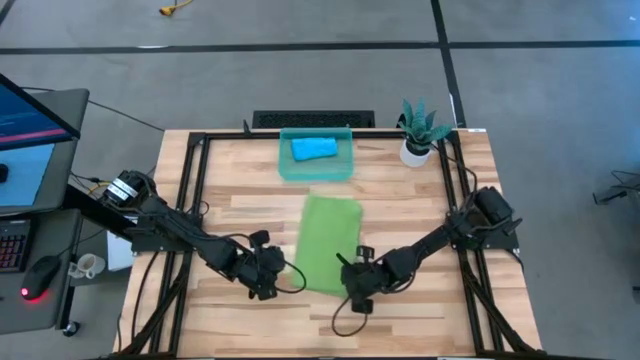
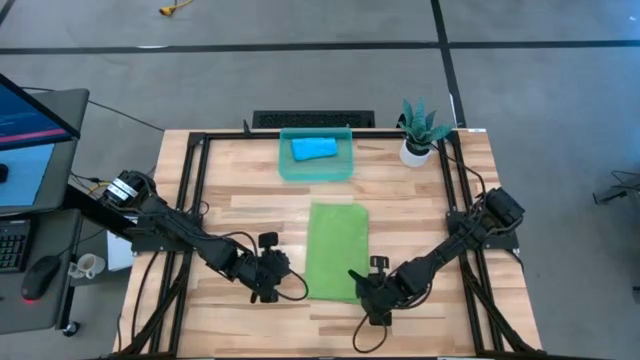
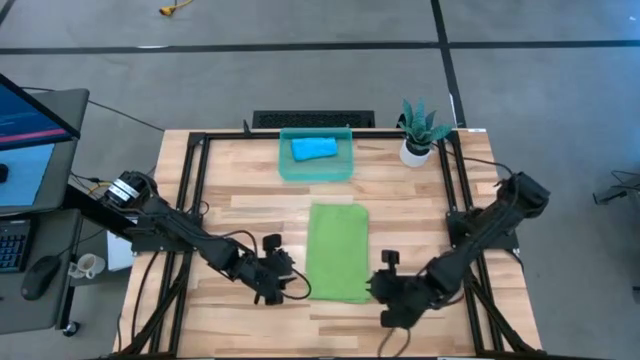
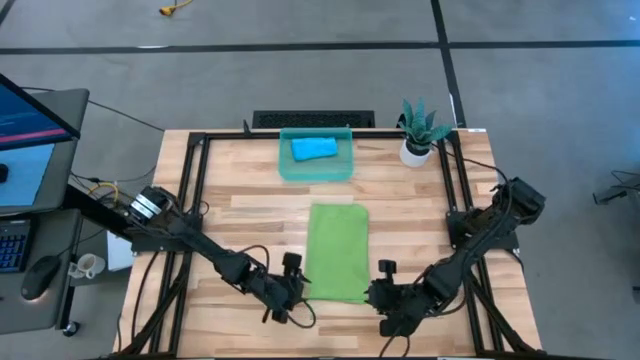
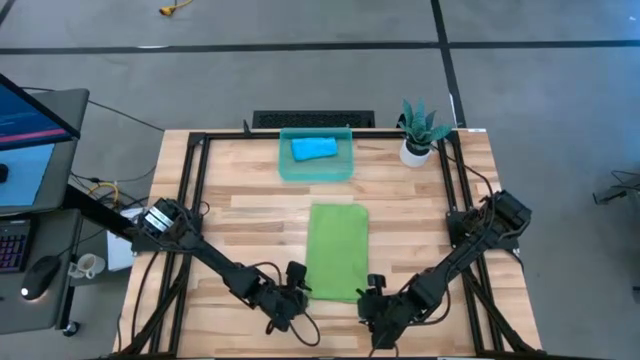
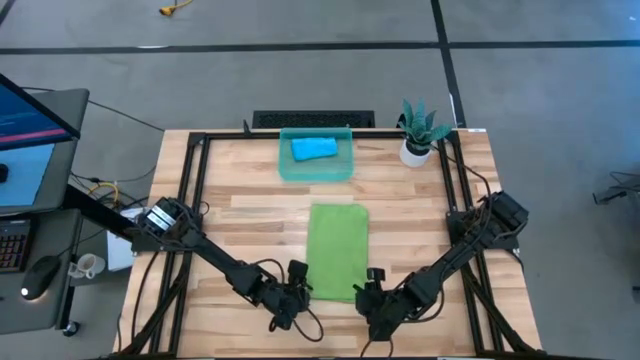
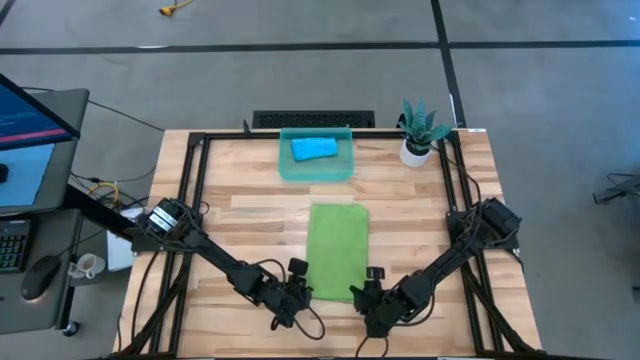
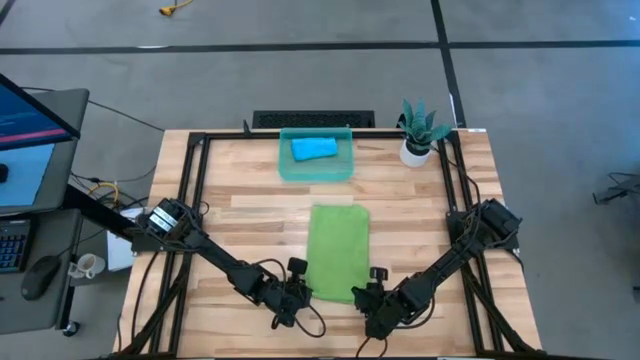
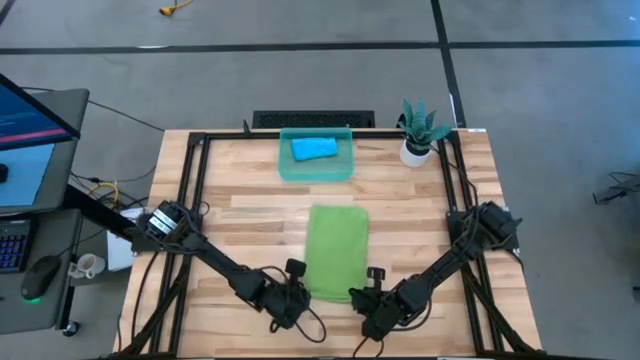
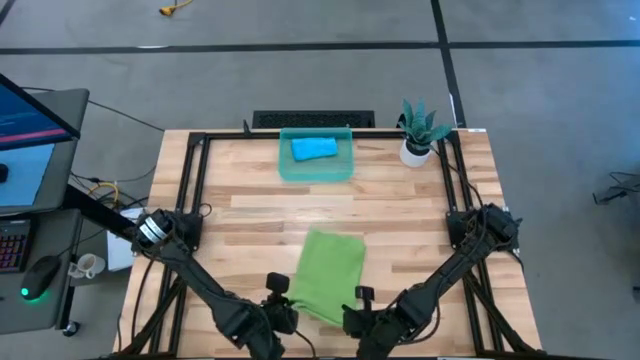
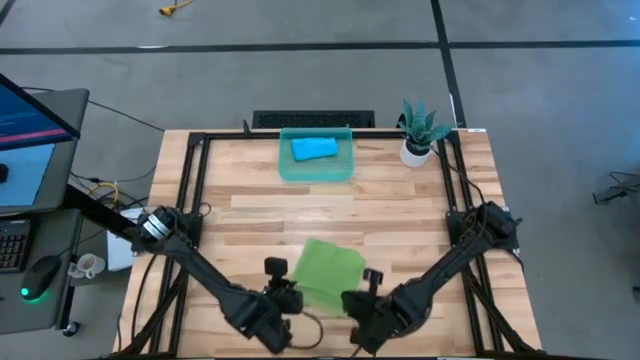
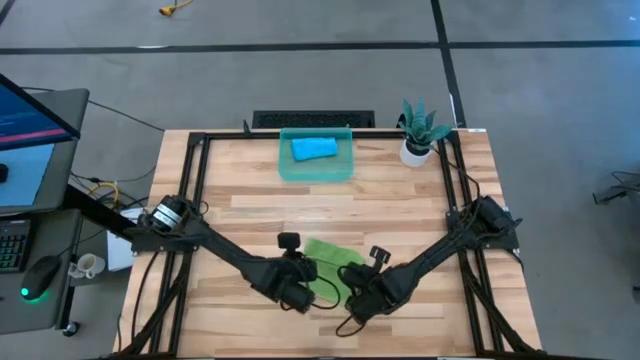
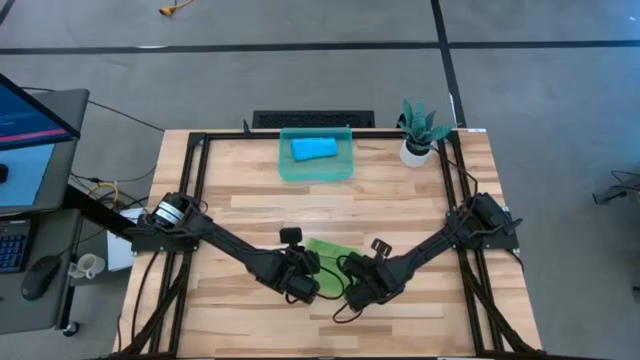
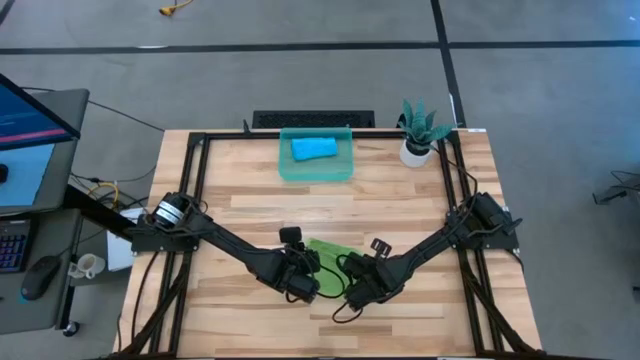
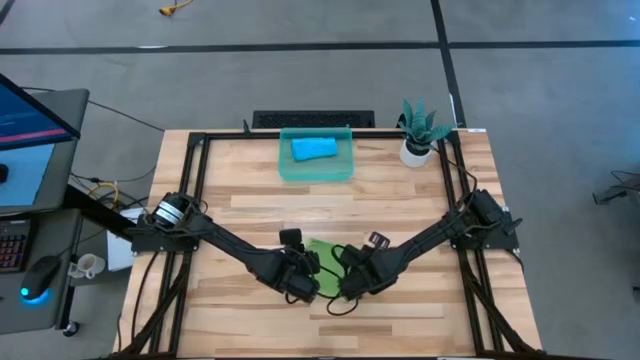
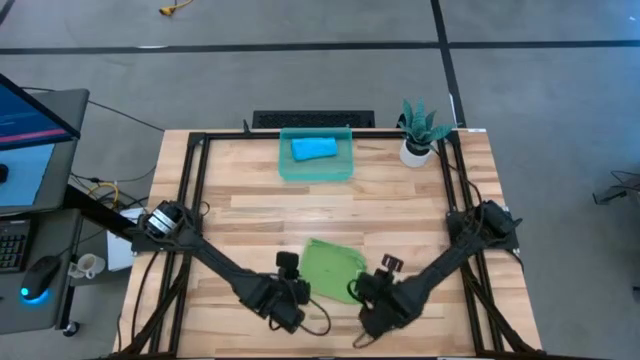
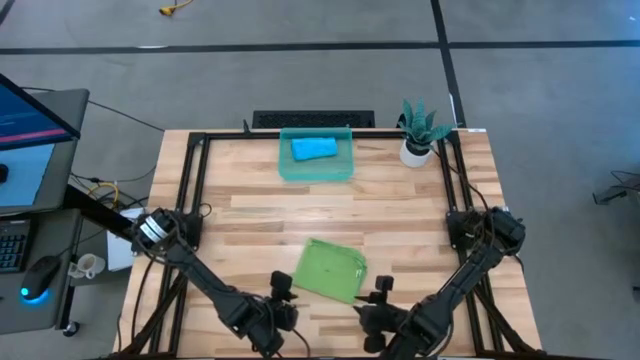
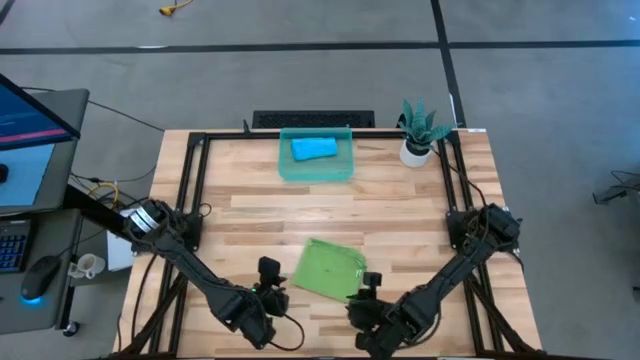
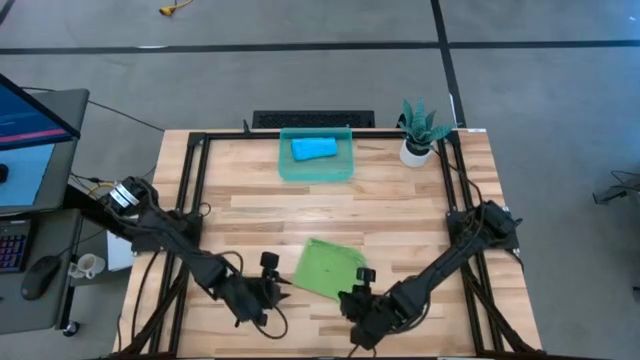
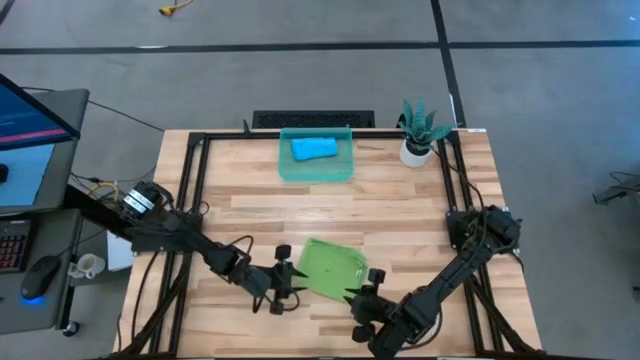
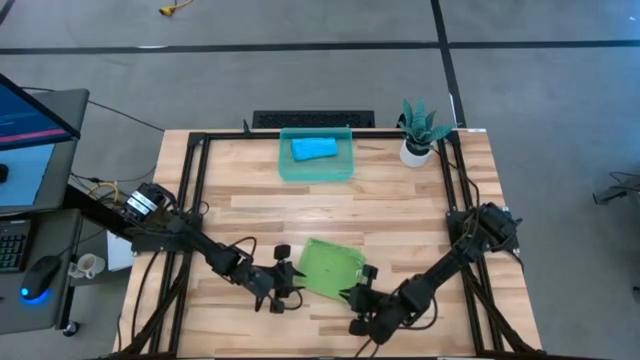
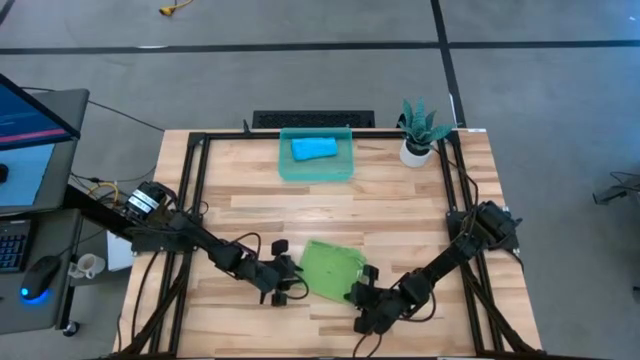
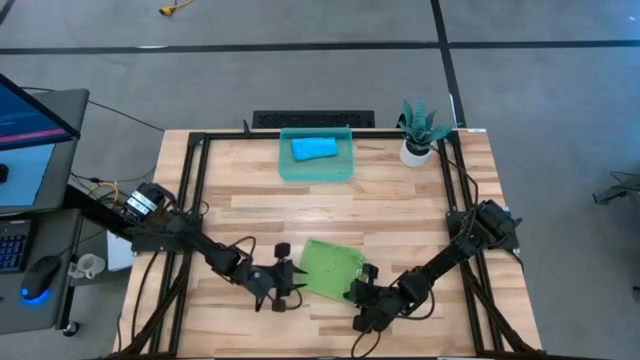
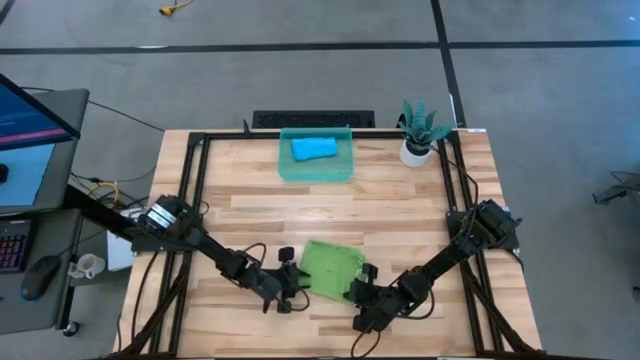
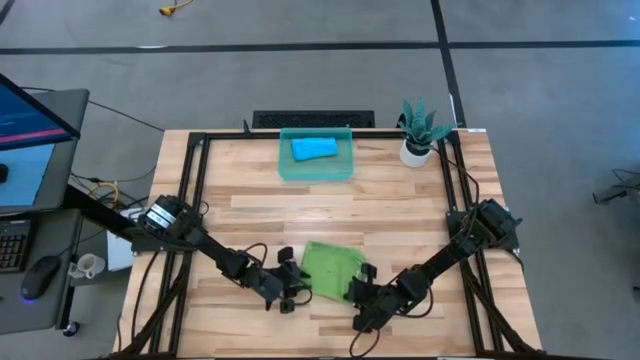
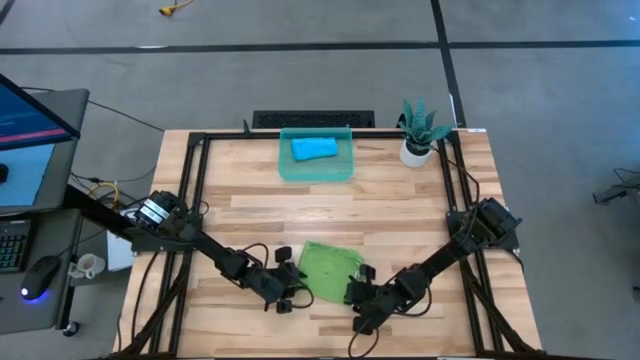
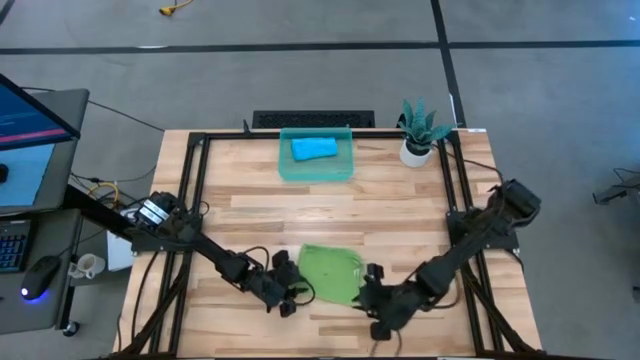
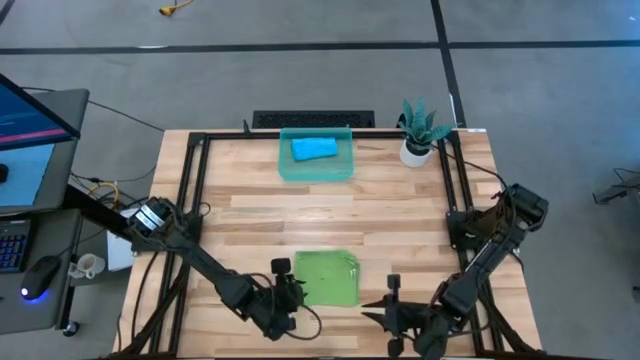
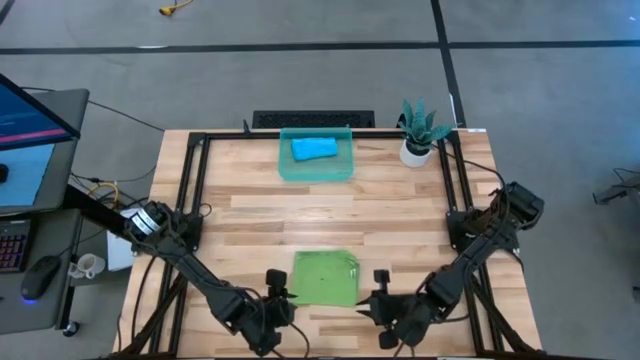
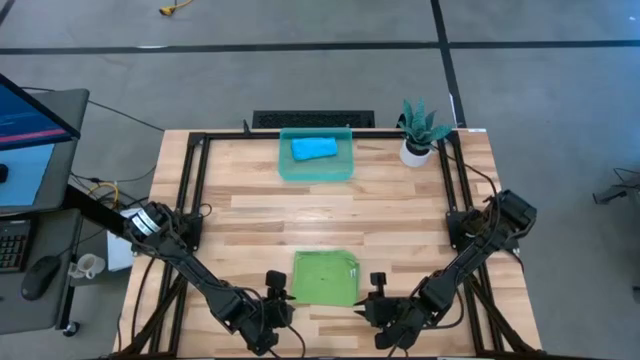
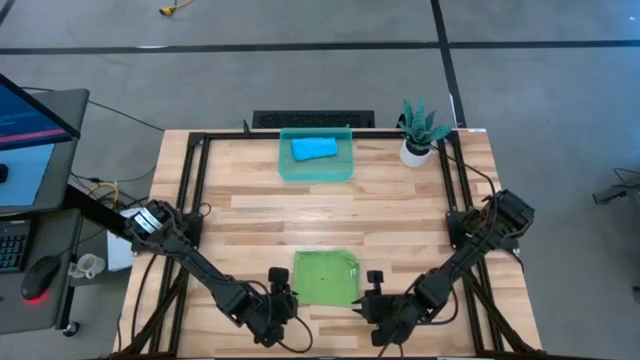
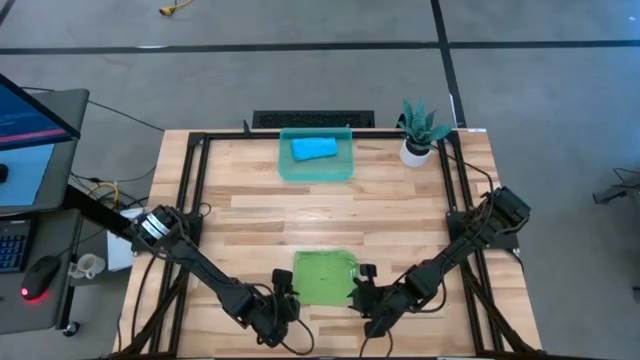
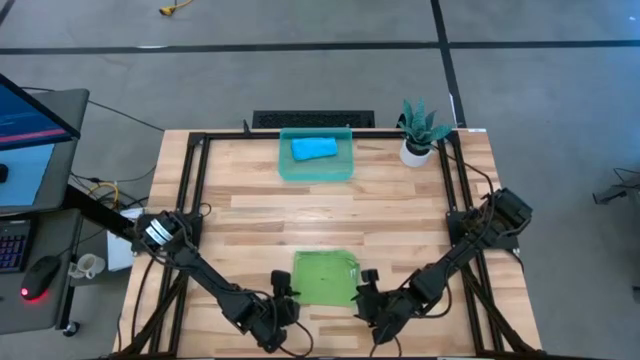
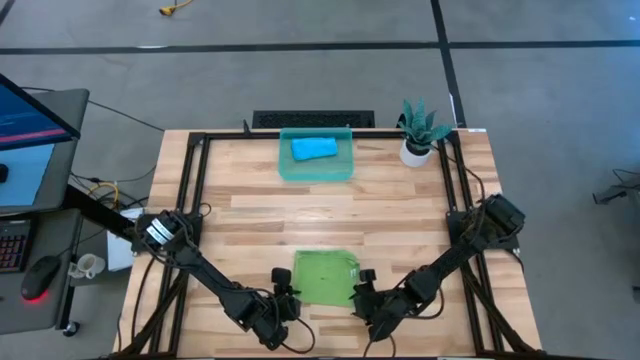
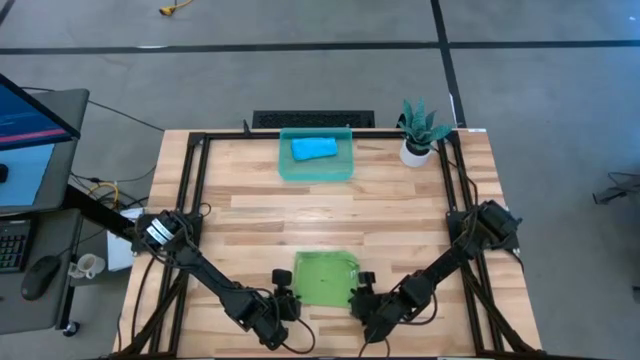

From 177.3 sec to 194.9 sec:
Task: Roll microfiber towels into tight, uniform cylinder then place into a basket
Fold the green microfiber cloth

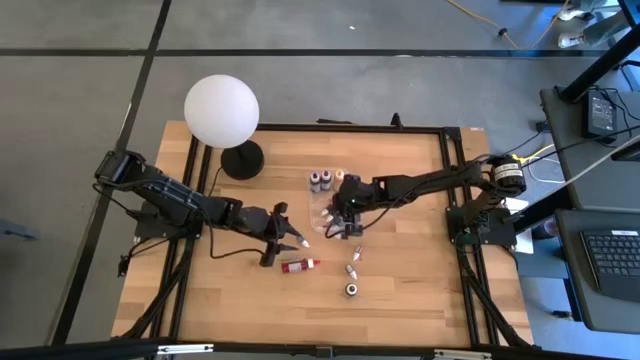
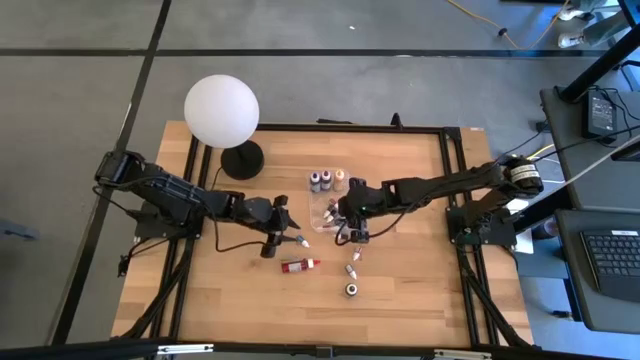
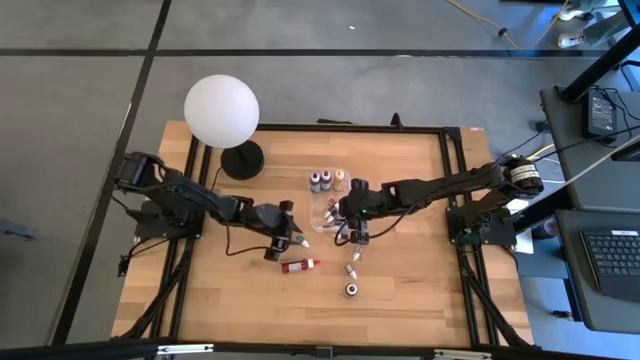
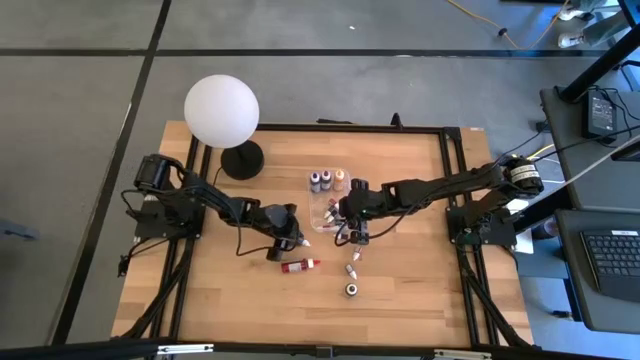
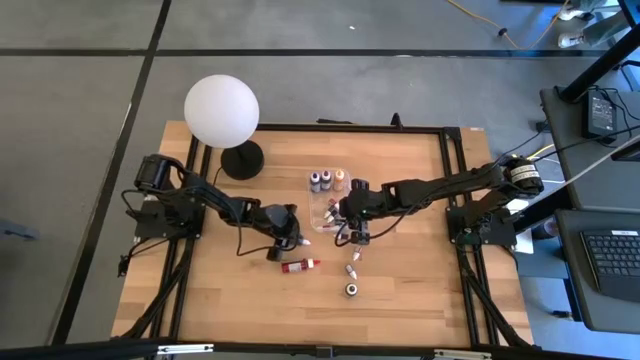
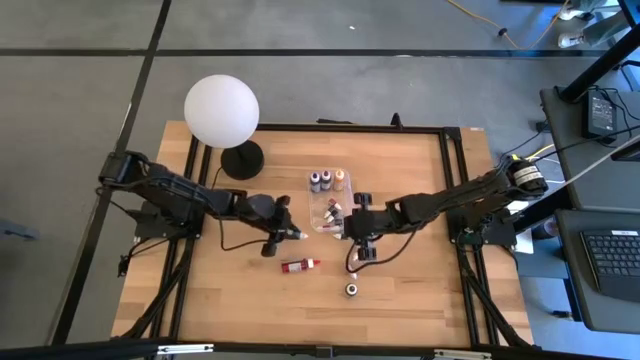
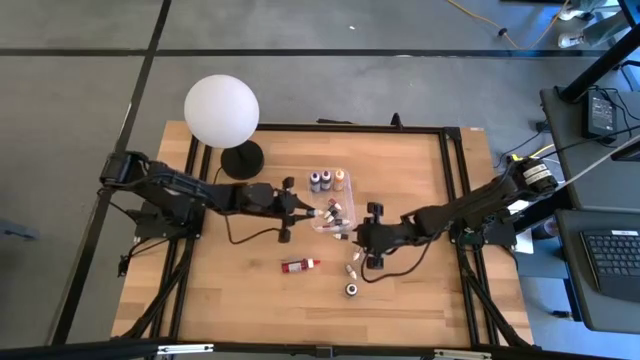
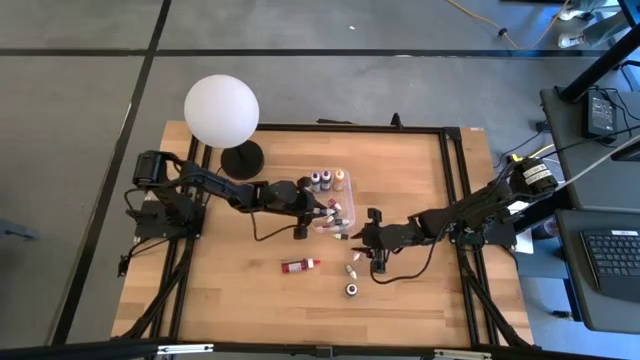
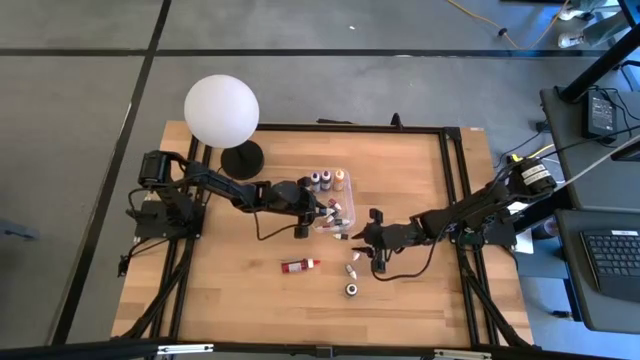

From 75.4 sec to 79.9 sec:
Task: Pick & Place food coloring
Put the small blue food coloring bottle in the transparent bin
